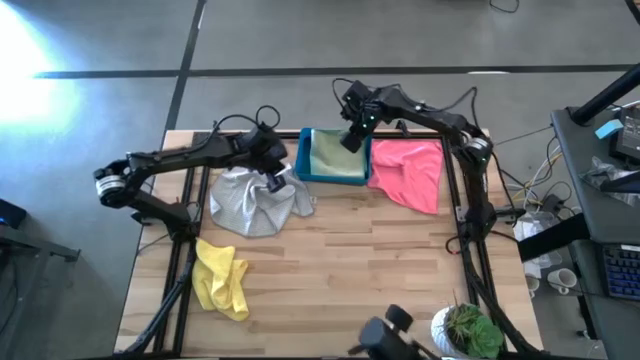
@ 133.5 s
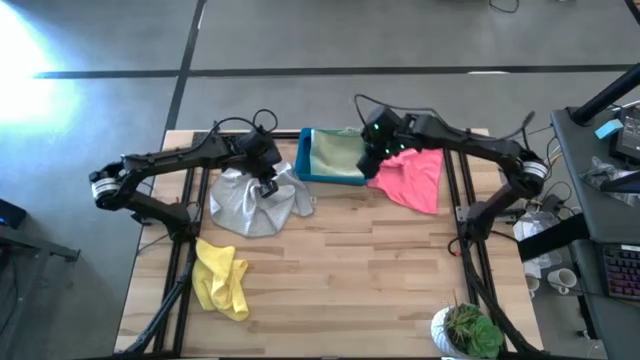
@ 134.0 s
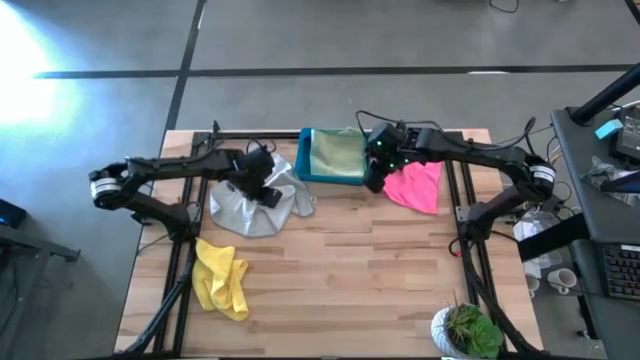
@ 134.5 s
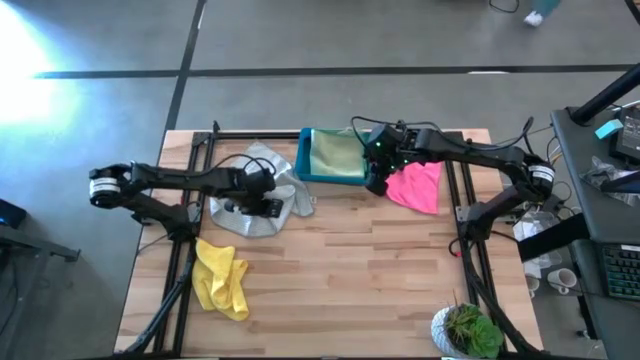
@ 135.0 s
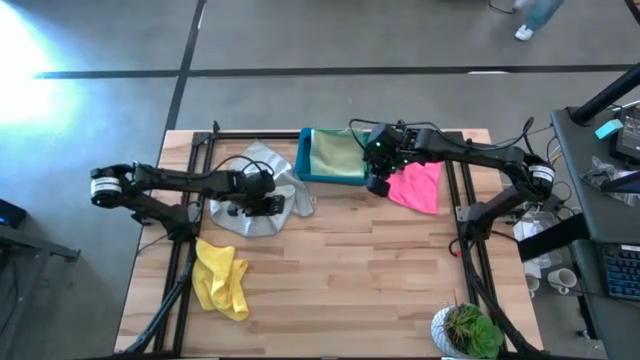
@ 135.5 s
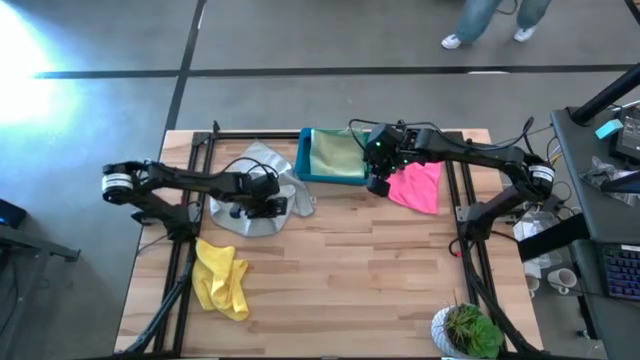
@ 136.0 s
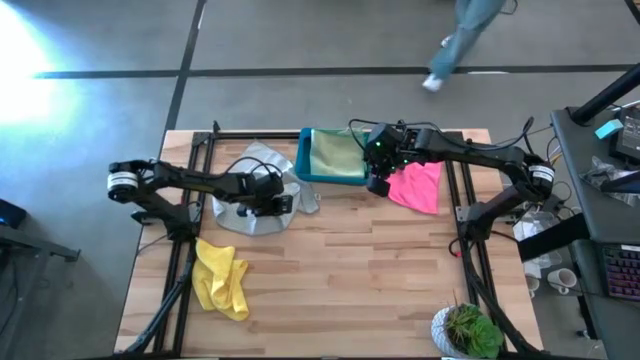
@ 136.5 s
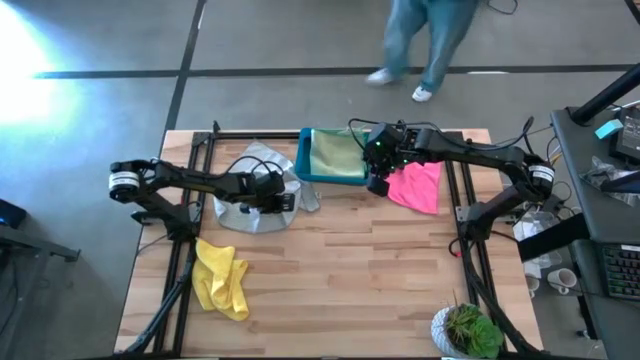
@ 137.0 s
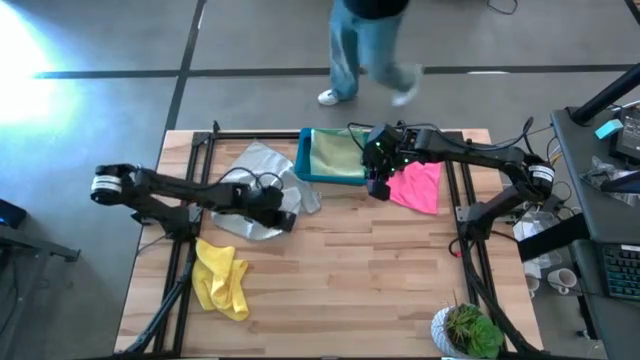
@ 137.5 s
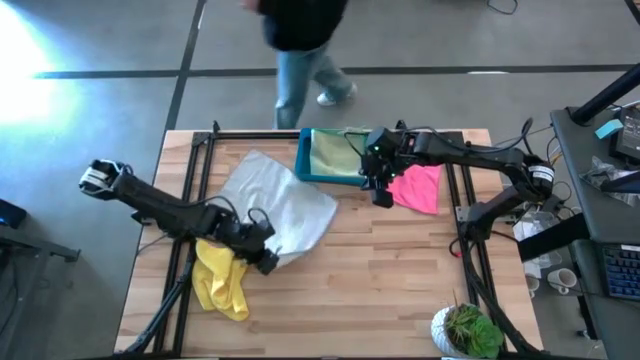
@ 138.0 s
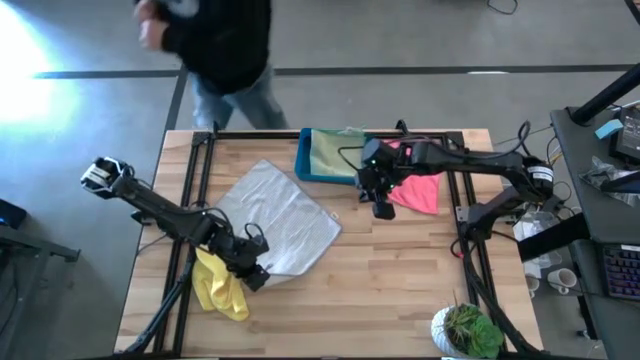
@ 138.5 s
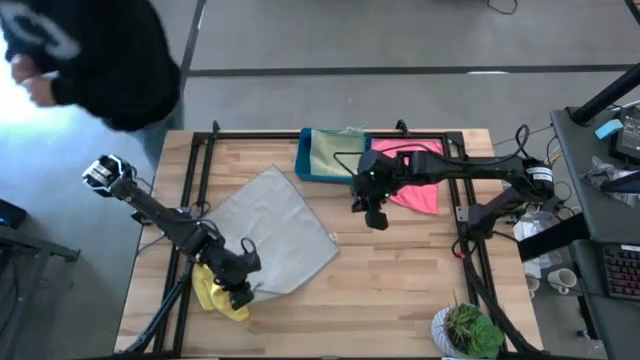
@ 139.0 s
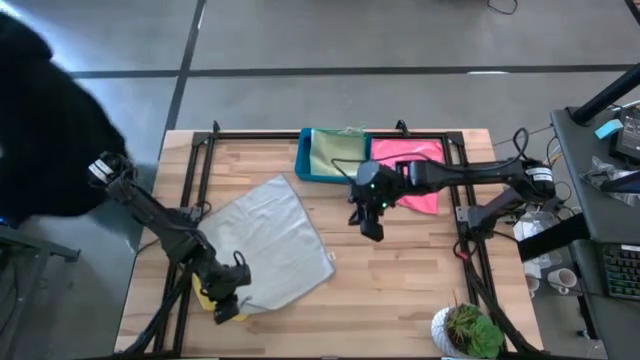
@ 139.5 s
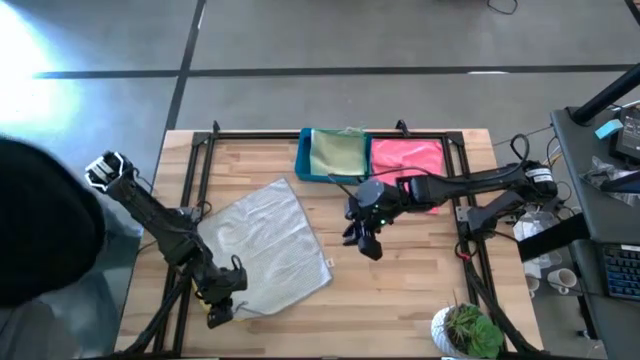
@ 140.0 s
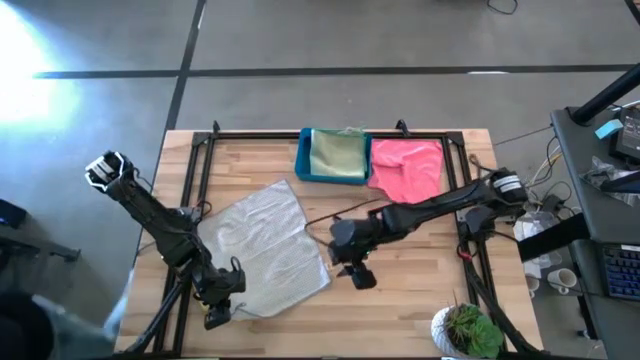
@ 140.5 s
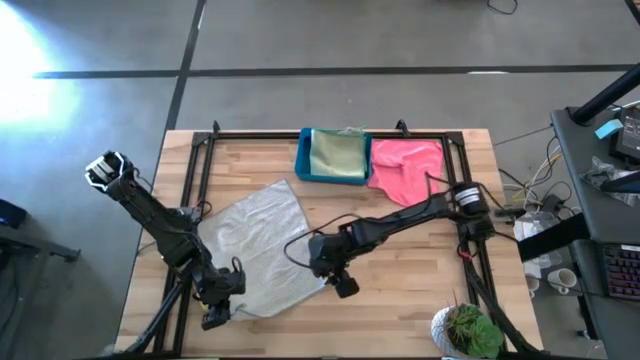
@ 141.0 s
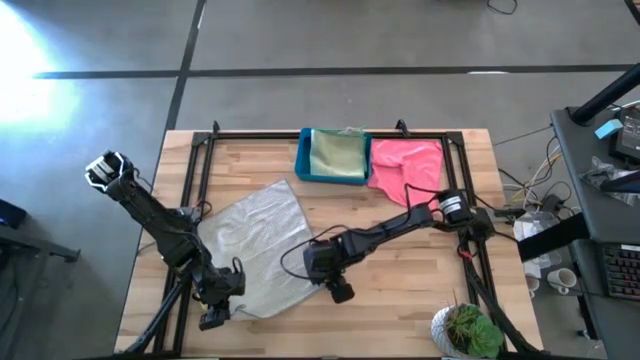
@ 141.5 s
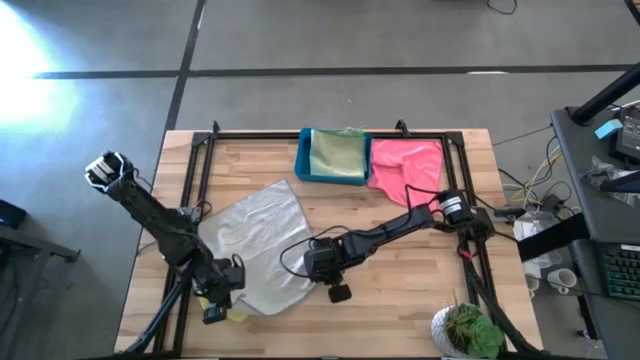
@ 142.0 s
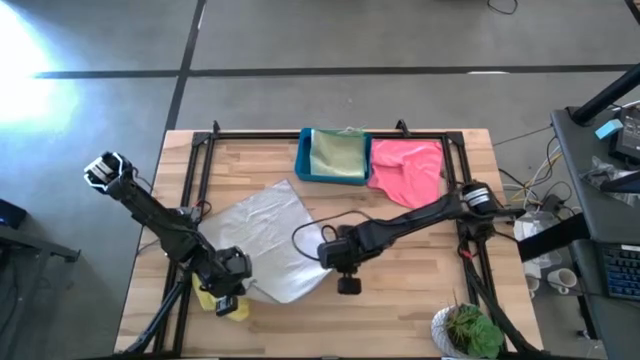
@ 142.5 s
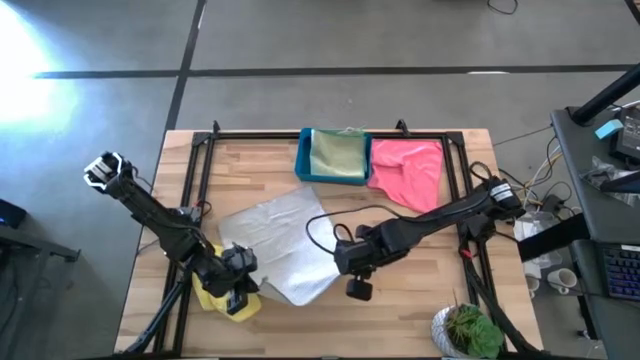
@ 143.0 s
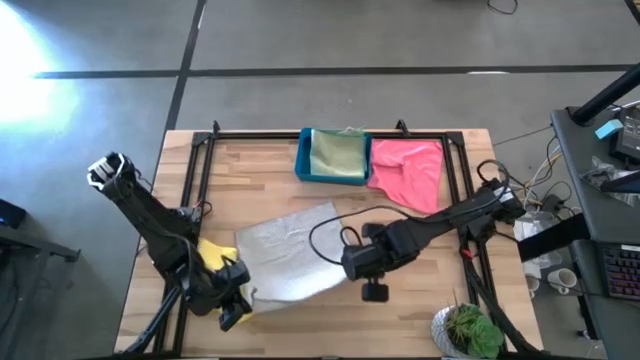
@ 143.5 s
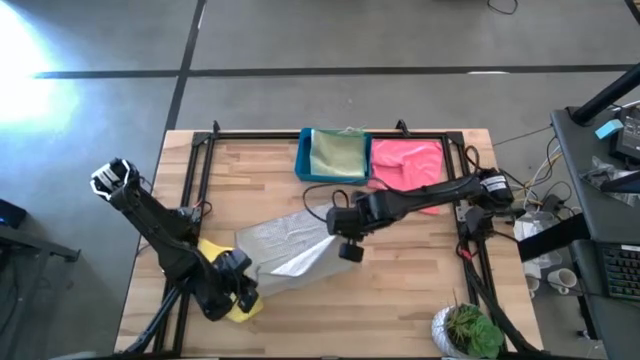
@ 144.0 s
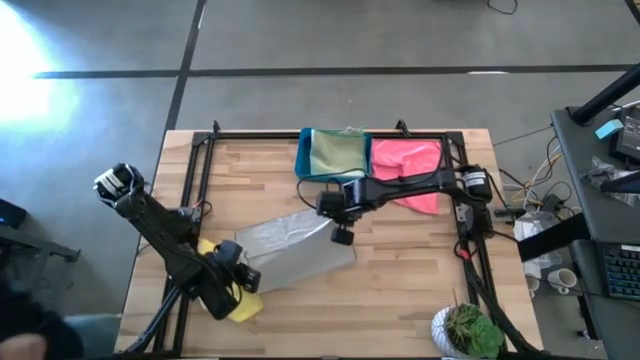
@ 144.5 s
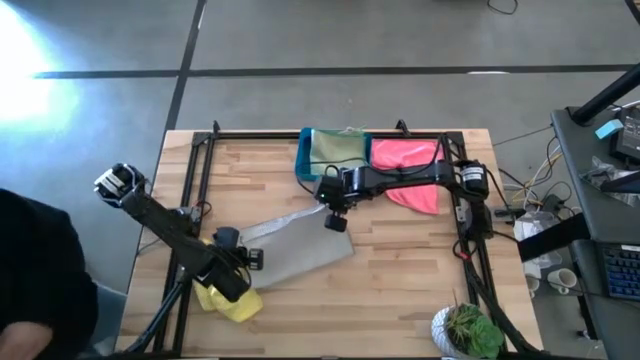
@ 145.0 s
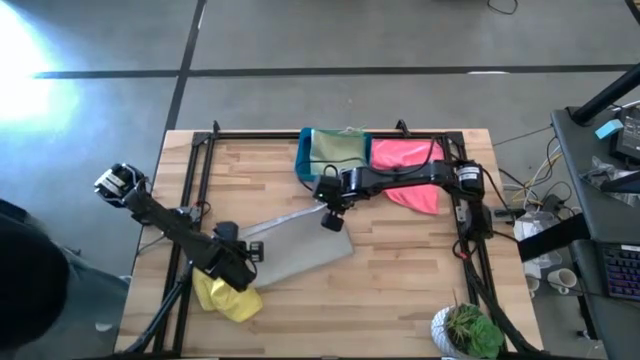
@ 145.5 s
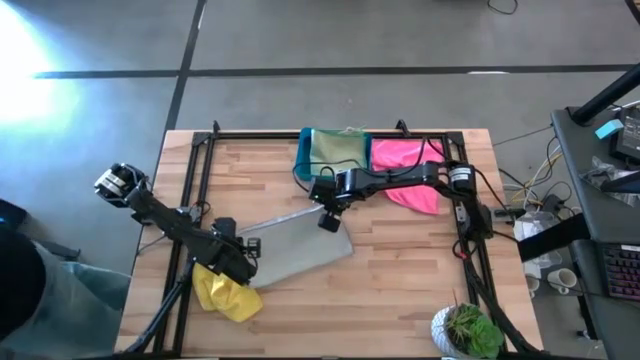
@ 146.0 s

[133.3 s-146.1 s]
Task: Fold microfiber towels
Fold the gray microfiber cloth

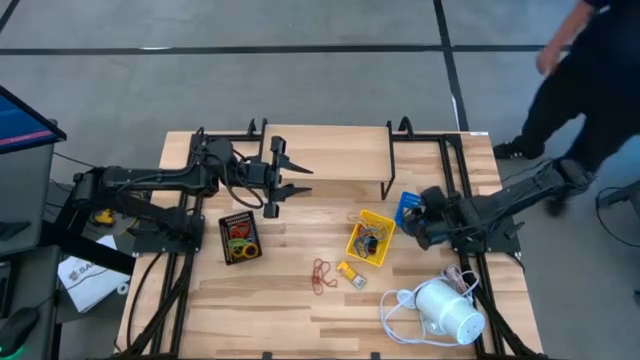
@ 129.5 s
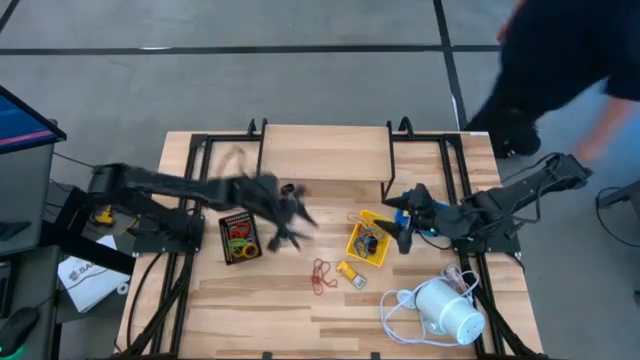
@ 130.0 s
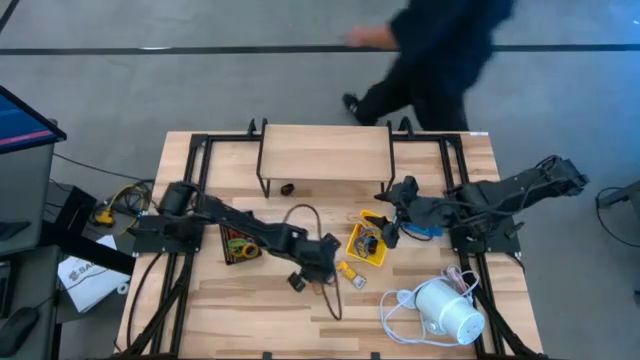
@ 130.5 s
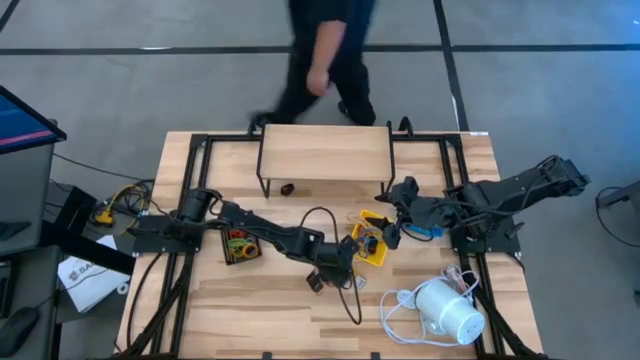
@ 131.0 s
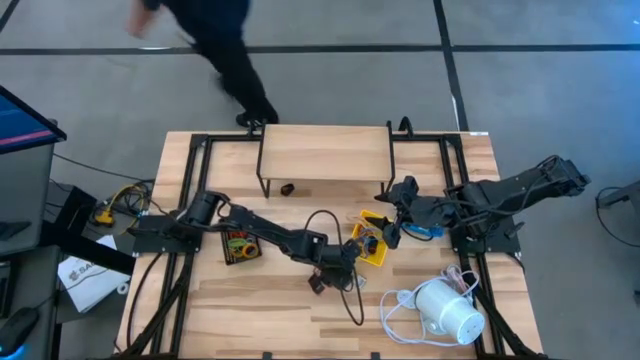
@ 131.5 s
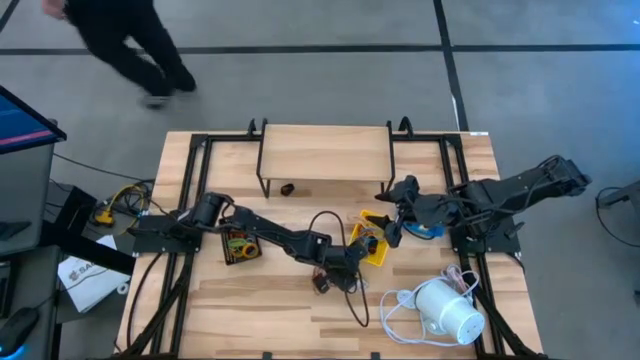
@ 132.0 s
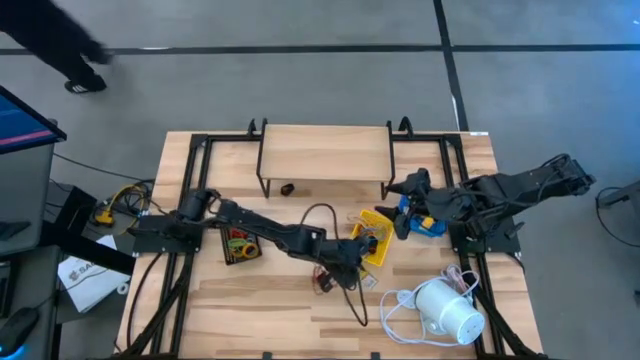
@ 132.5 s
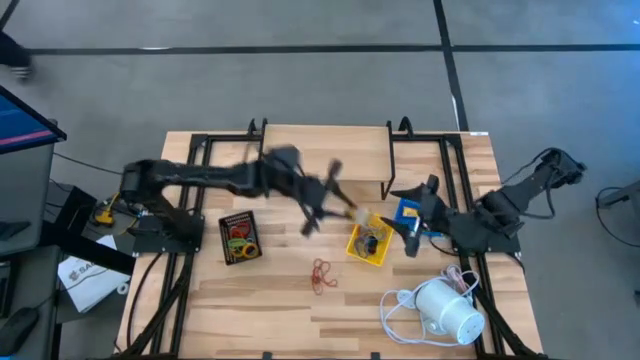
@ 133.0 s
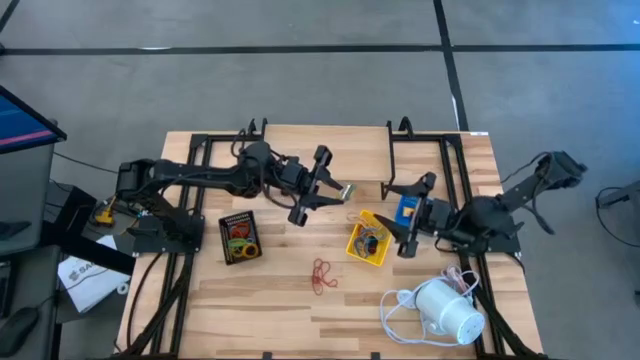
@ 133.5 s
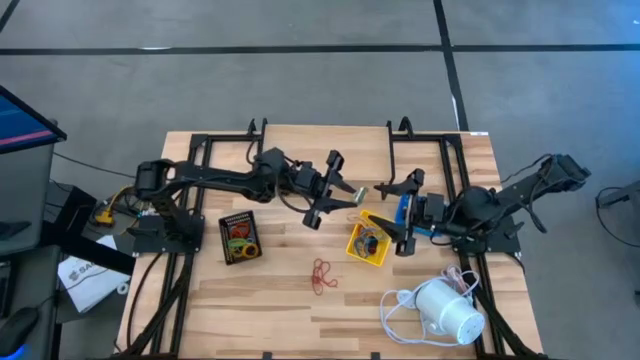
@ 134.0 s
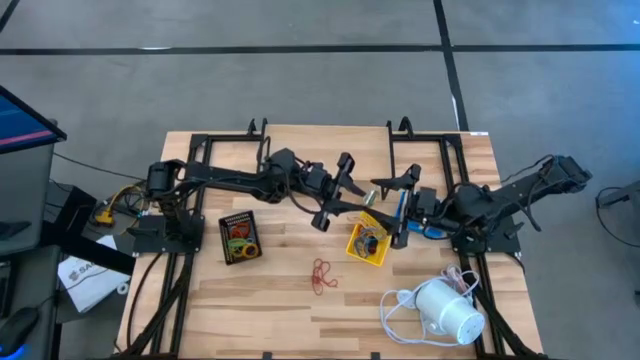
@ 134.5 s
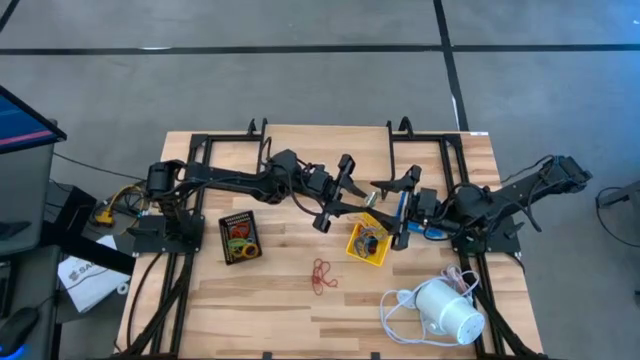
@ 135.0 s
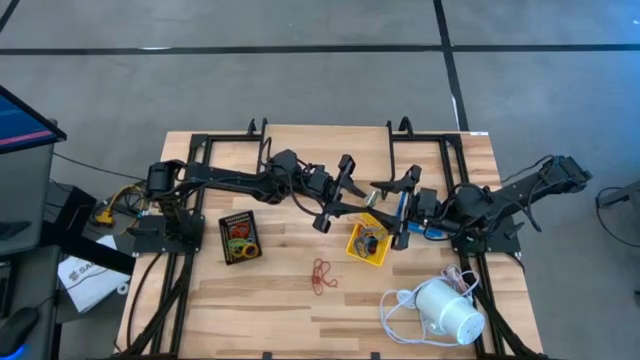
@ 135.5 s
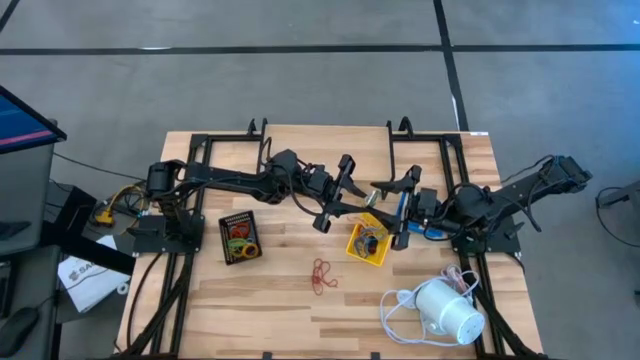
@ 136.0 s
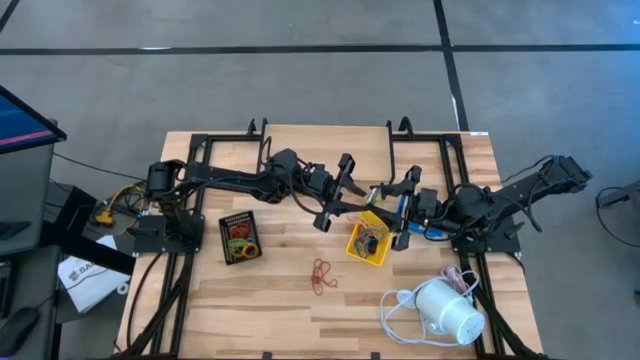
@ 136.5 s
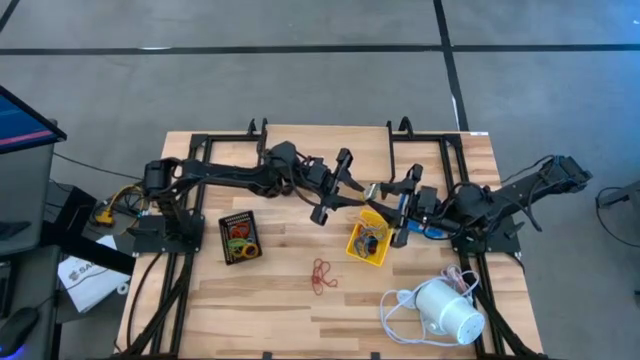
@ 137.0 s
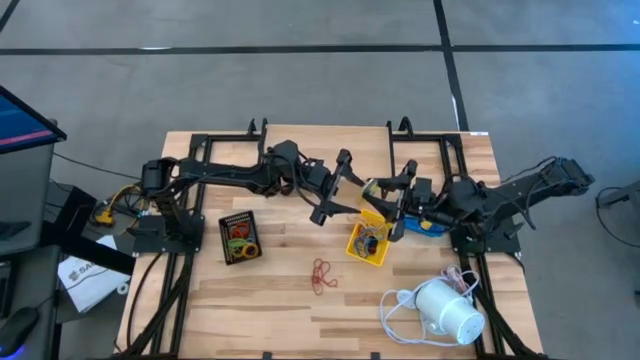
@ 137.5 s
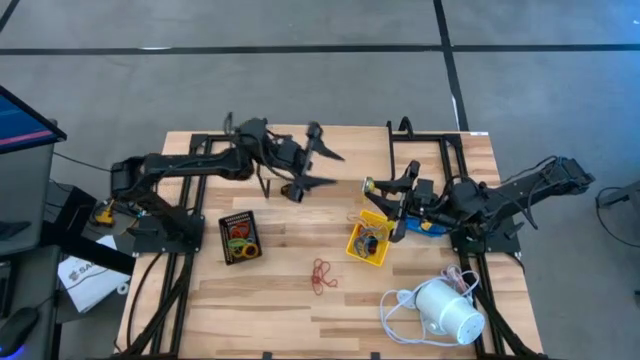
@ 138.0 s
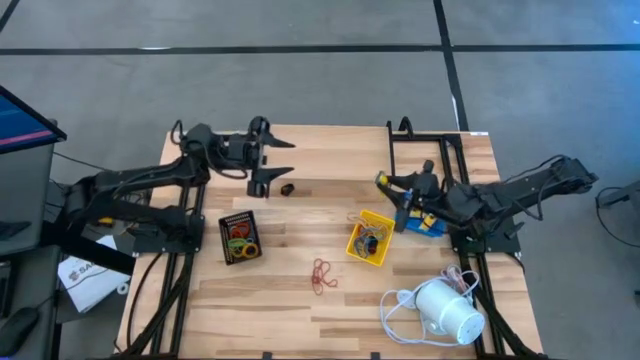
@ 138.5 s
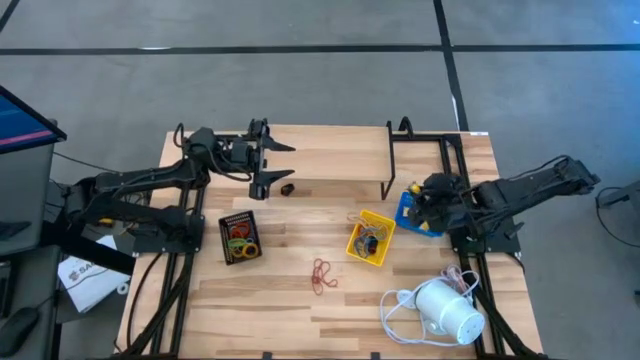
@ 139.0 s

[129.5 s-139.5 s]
Task: Pick & Place Office Desk Supplies
Put the yellow crayon box into the blue bin
